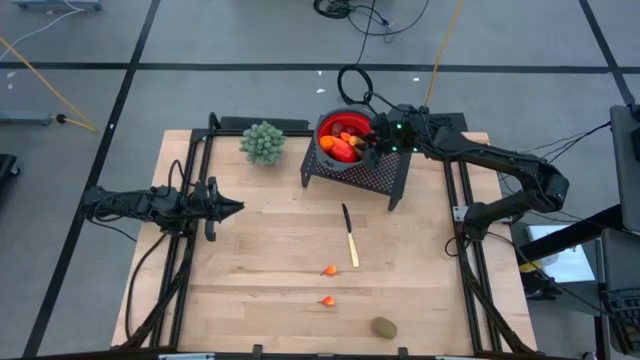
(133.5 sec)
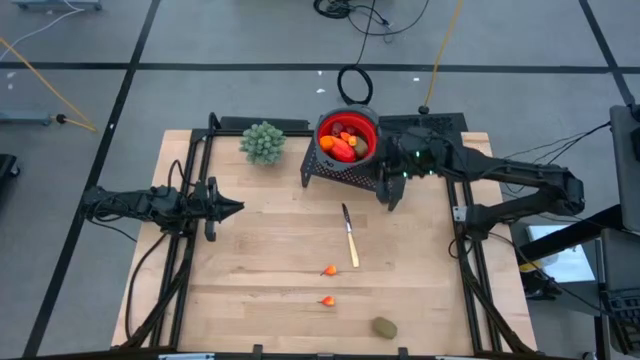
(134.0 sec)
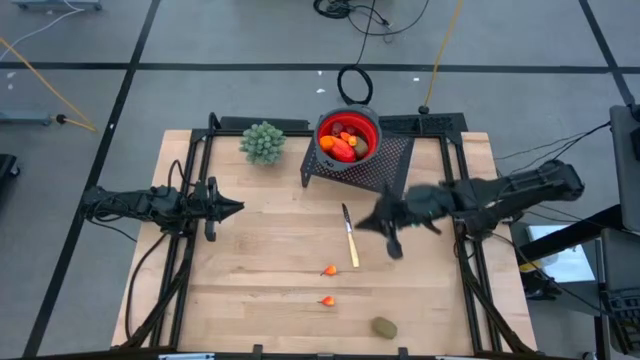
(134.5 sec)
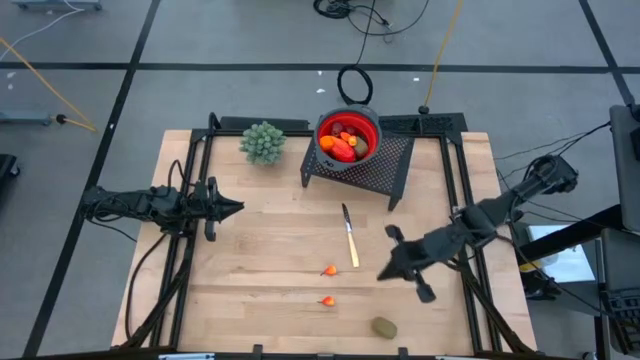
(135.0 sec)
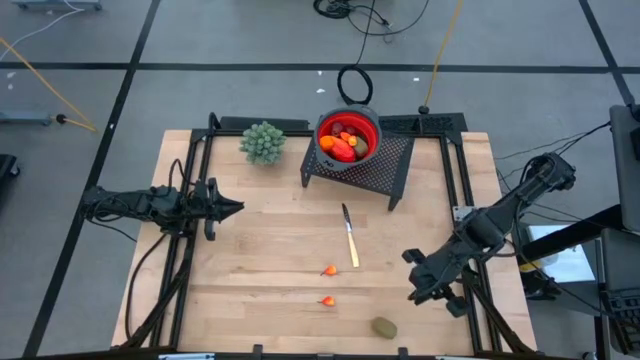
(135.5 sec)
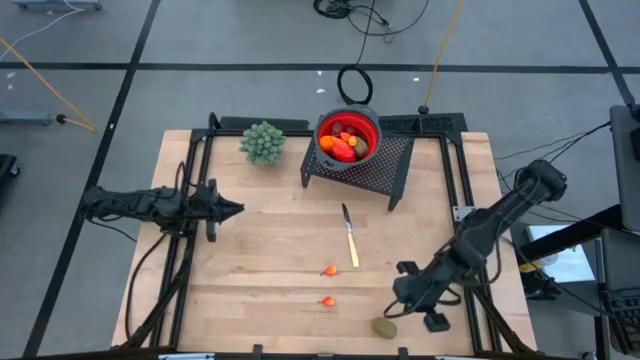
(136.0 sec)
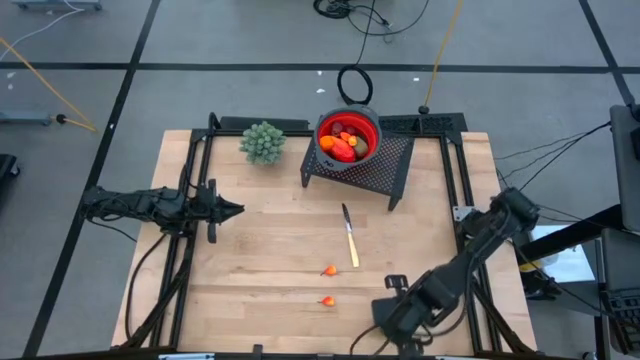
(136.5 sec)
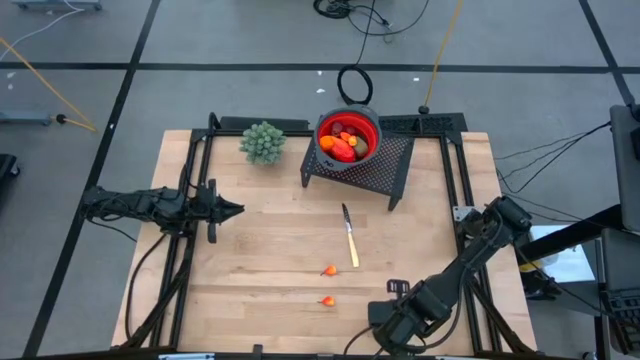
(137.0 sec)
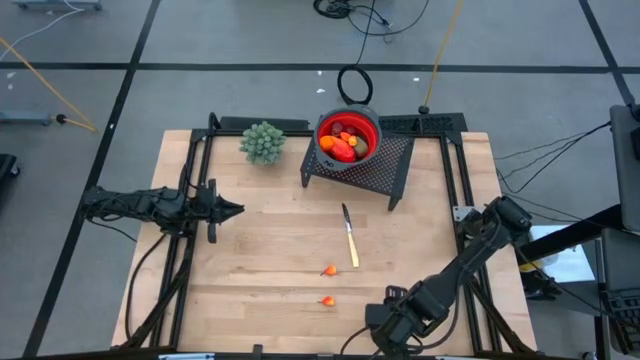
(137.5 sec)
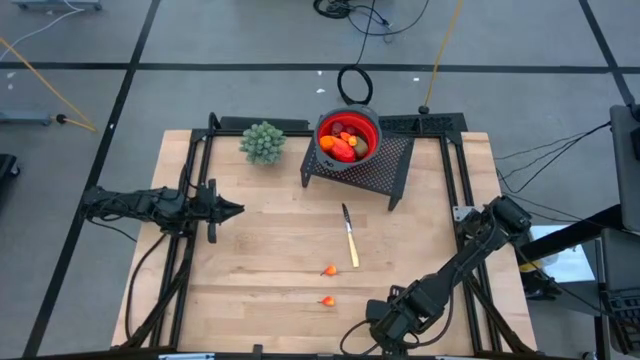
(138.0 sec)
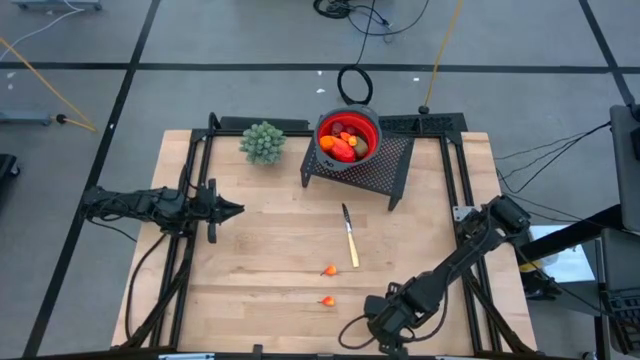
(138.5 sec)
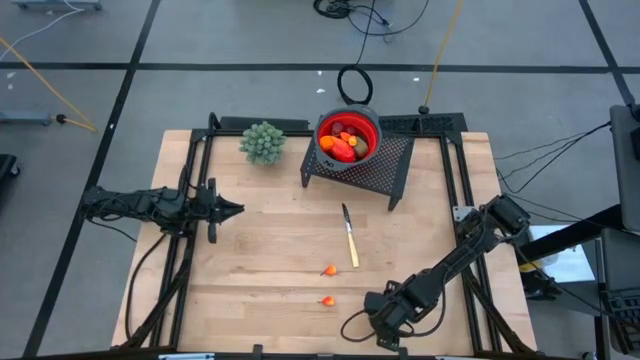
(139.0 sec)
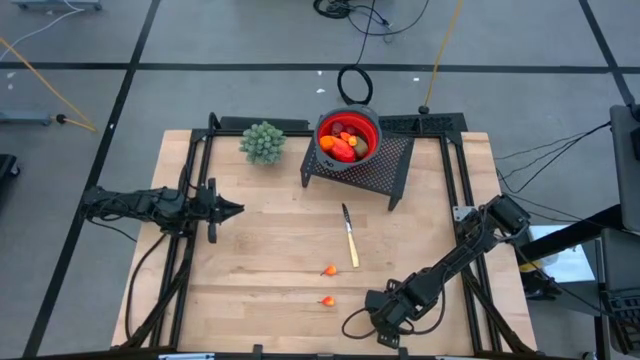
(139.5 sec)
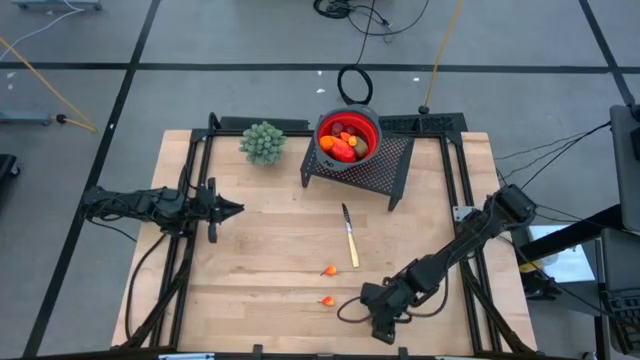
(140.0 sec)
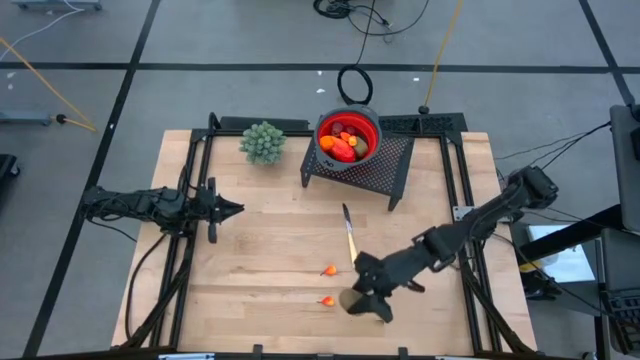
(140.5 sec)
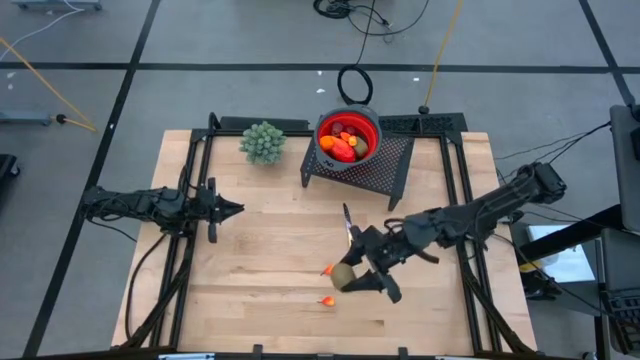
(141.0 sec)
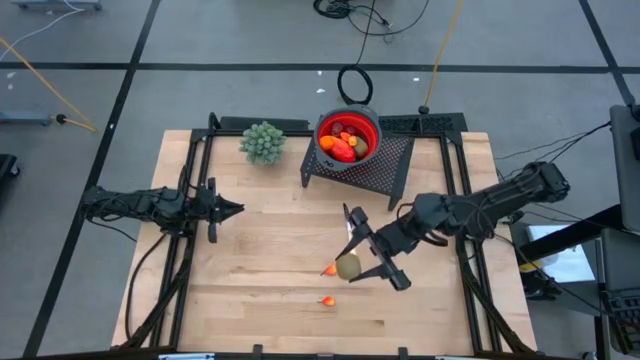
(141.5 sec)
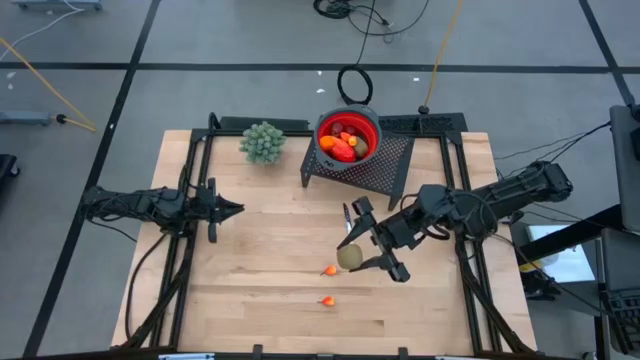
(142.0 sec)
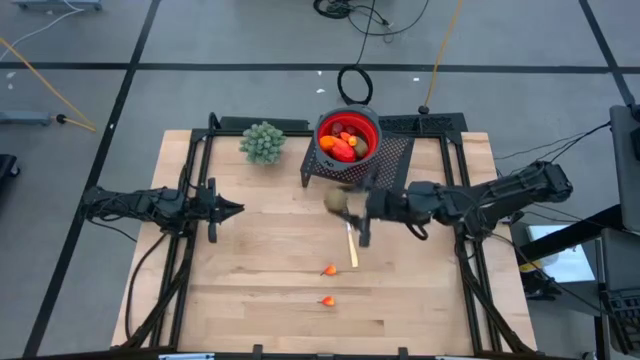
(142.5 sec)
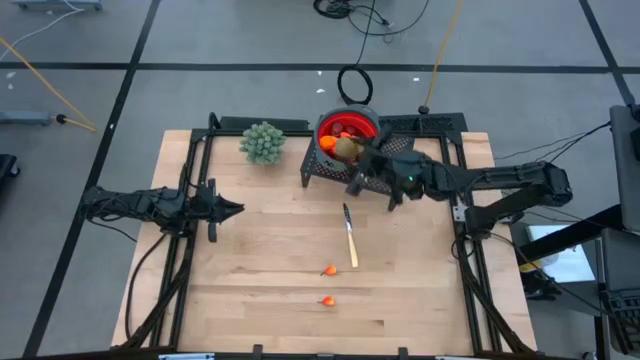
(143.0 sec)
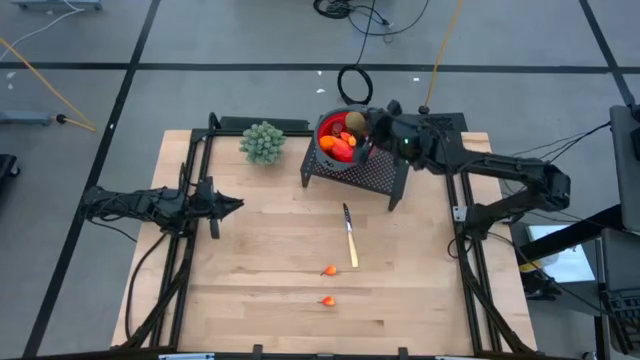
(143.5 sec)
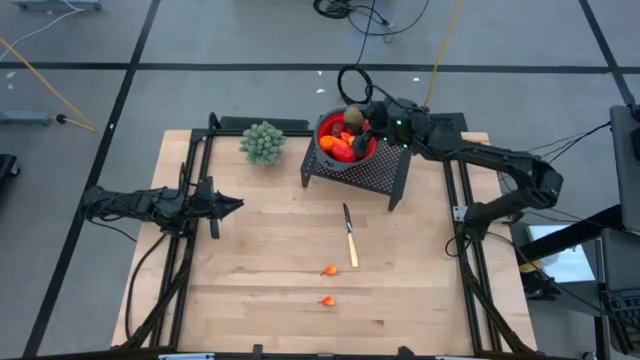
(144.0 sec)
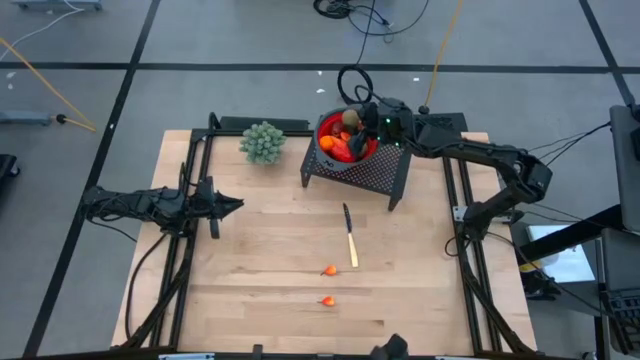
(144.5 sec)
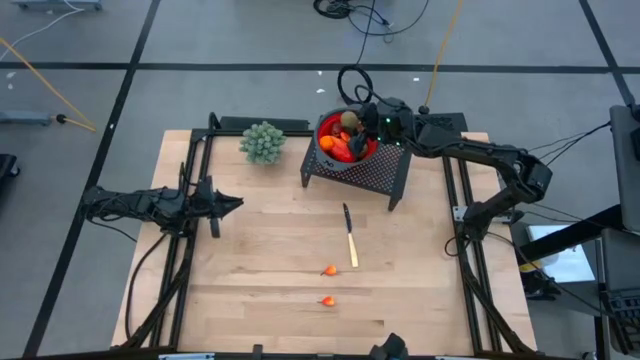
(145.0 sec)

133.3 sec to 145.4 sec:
Task: Pick & Place Fruit
Put the green kiwi into the red strainer bowl on the shelf

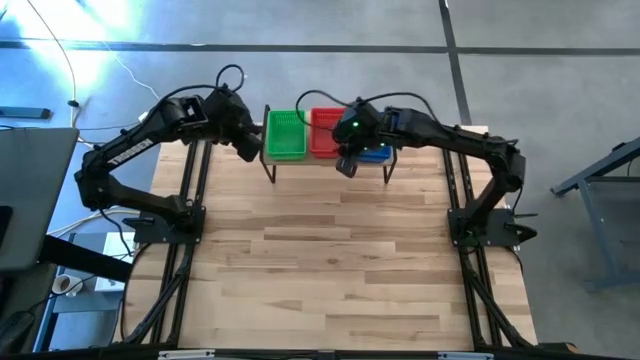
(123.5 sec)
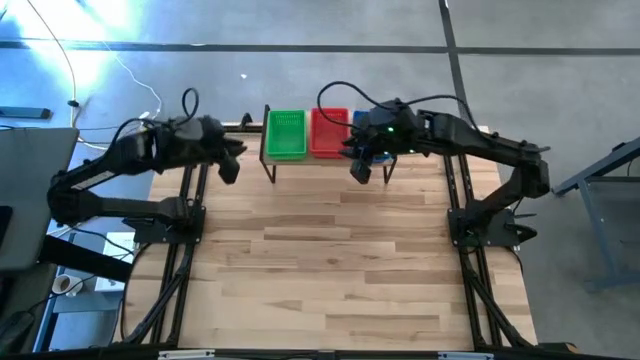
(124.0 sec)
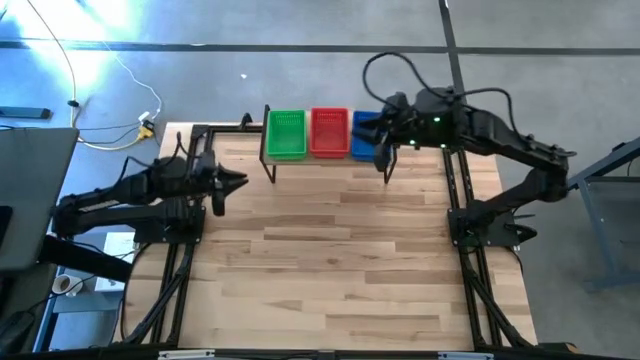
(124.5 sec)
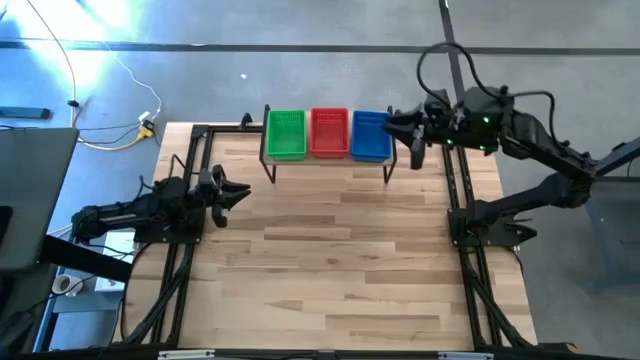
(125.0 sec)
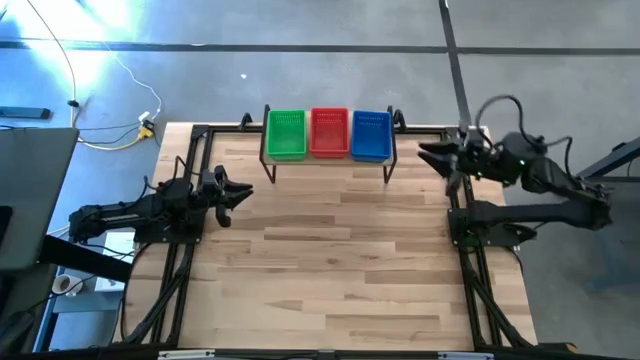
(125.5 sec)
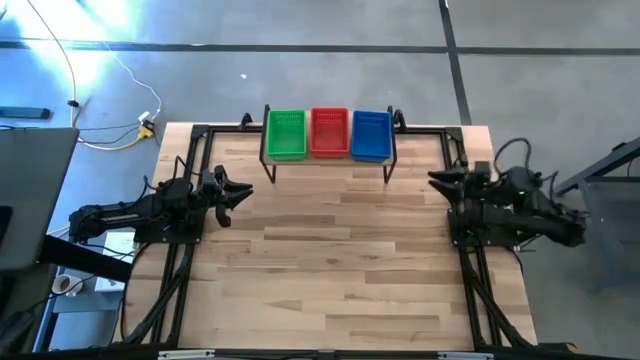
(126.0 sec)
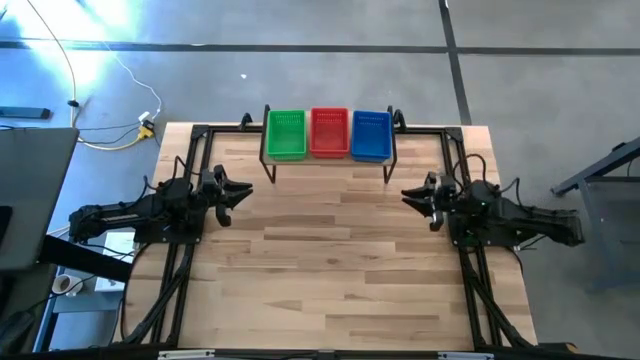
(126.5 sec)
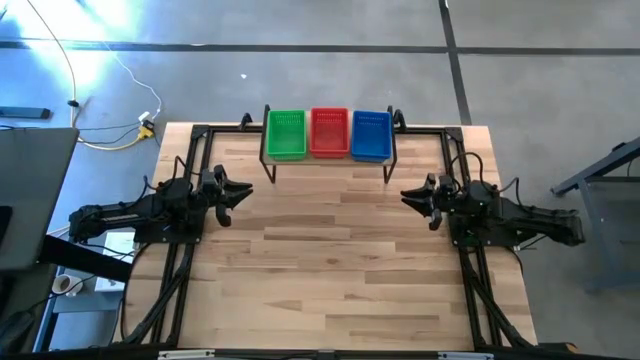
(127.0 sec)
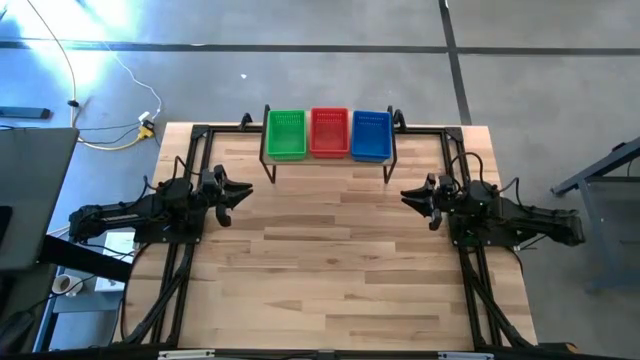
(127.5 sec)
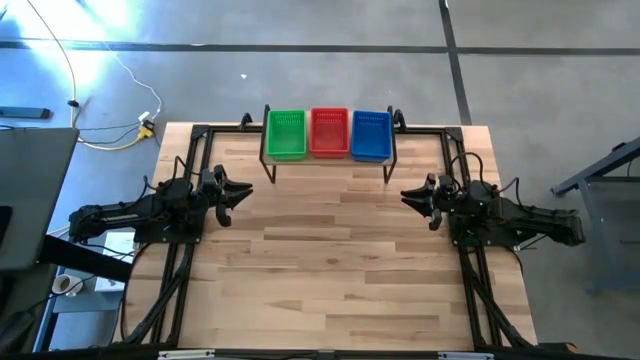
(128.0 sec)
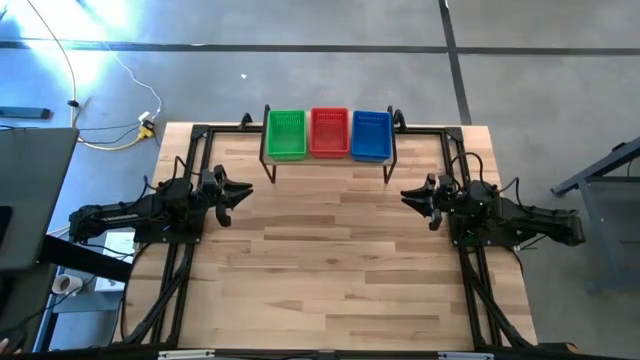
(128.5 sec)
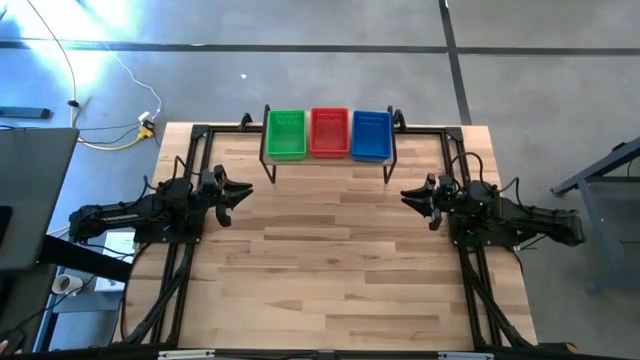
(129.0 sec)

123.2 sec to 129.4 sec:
Task: Stack baskets on shelf by color
Return to Home Position

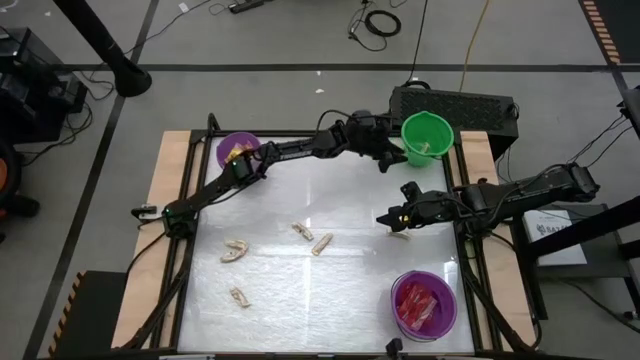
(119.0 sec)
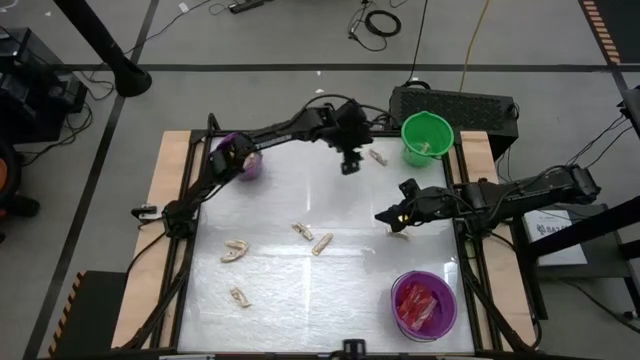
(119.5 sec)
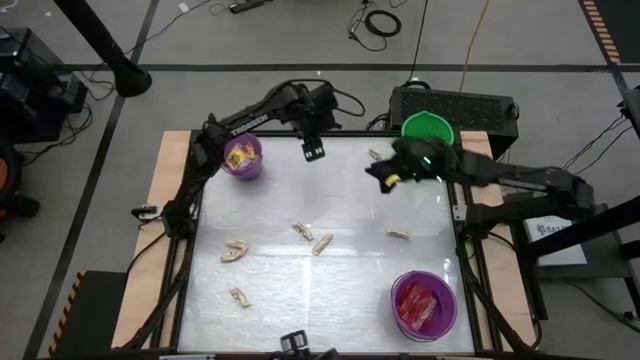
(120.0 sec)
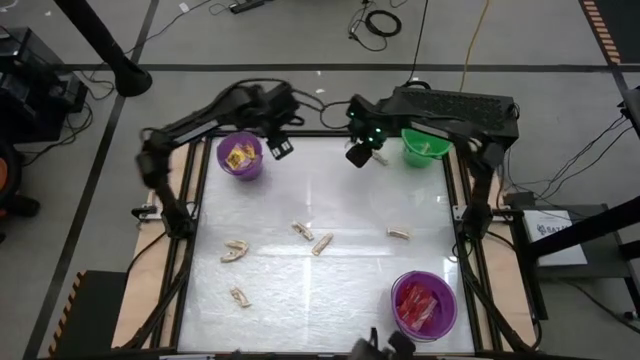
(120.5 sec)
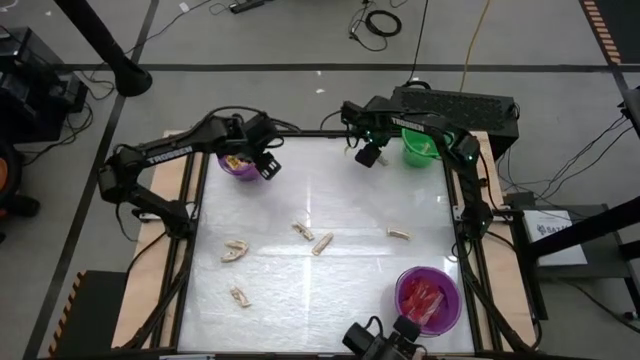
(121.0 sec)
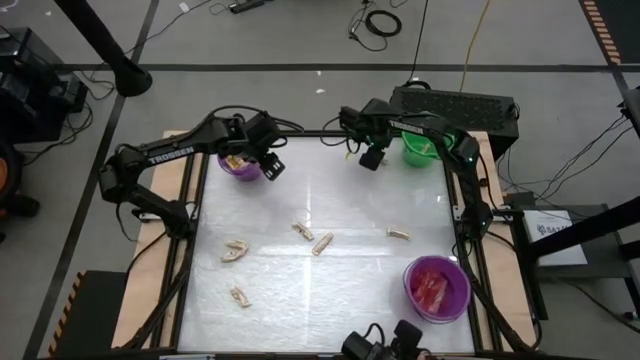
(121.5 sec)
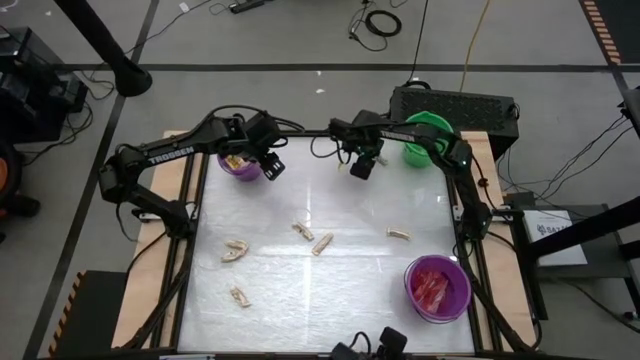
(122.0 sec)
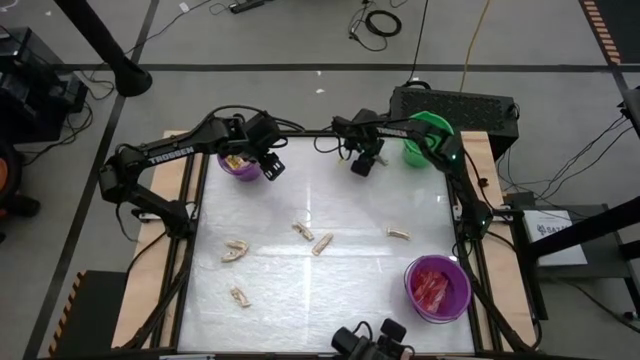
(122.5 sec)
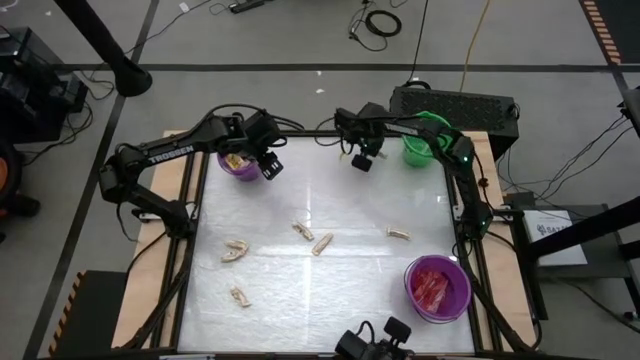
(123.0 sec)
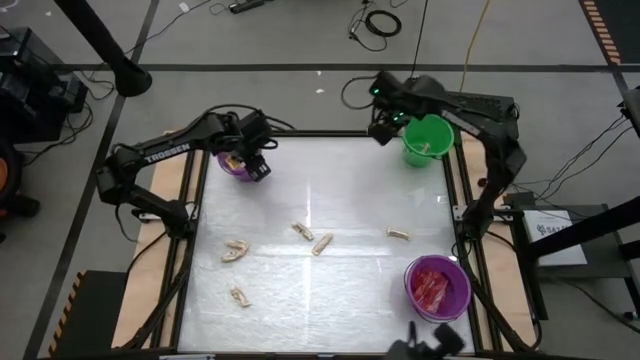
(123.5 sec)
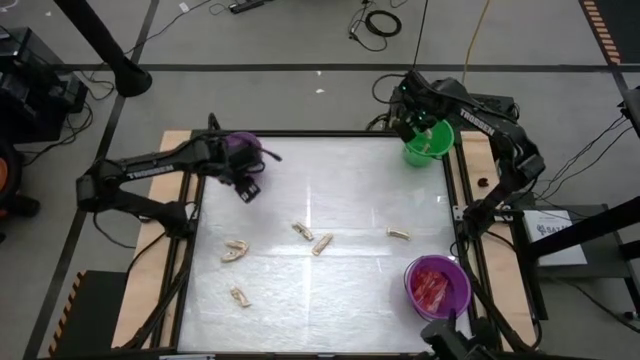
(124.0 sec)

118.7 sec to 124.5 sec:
Task: Sort candy by brand, put in halloween buckets
Put the white candy into the green bucket
